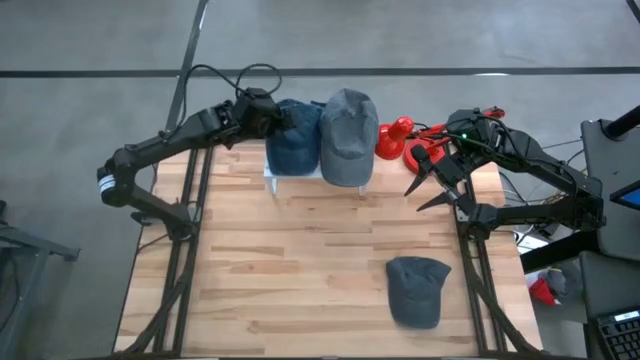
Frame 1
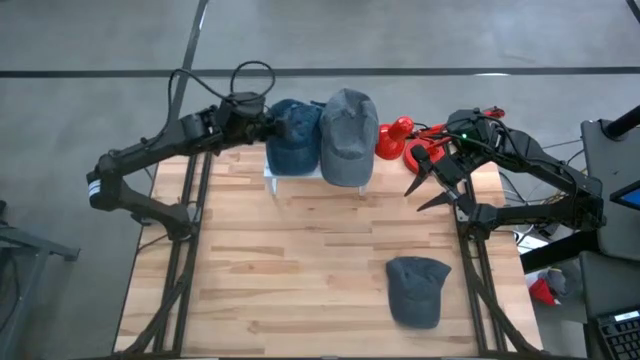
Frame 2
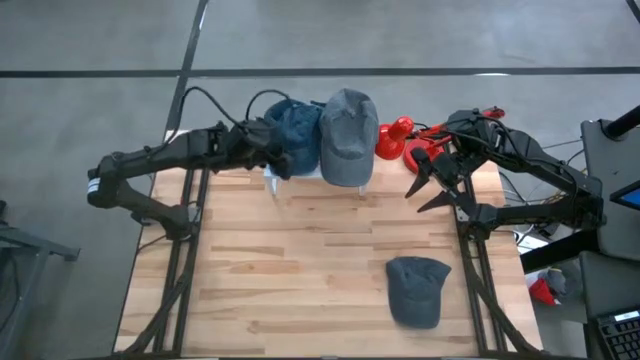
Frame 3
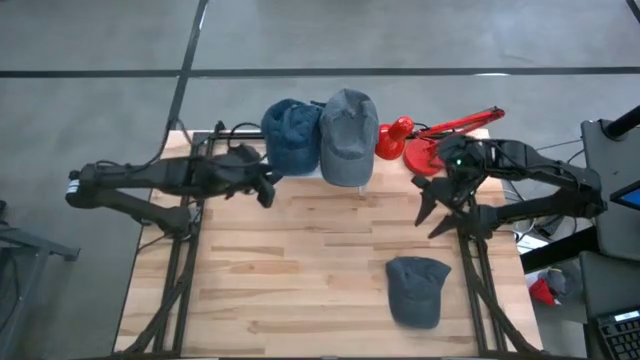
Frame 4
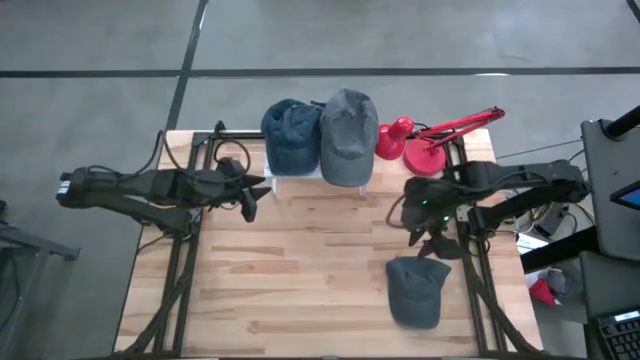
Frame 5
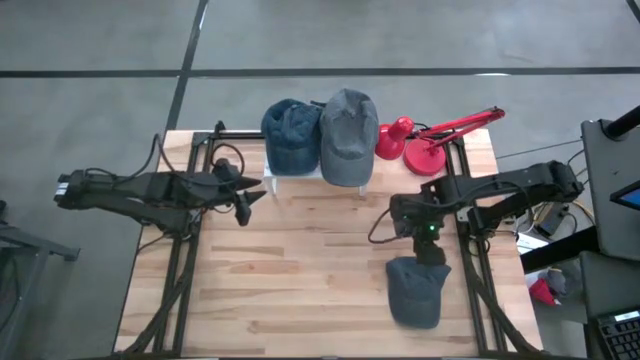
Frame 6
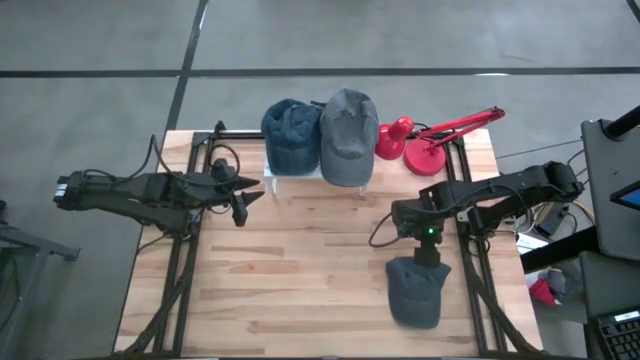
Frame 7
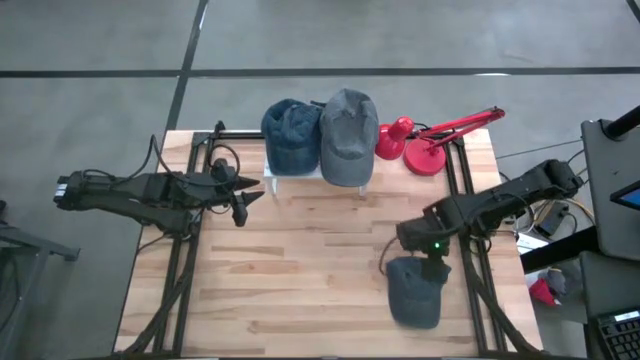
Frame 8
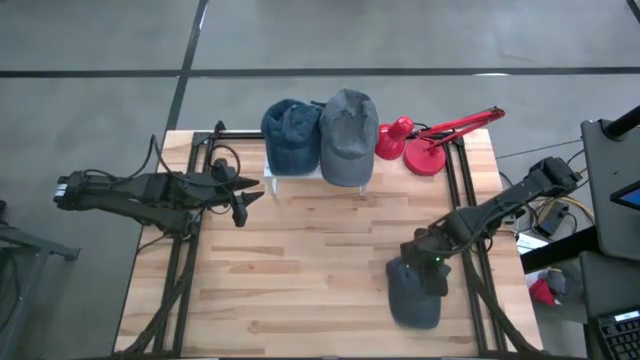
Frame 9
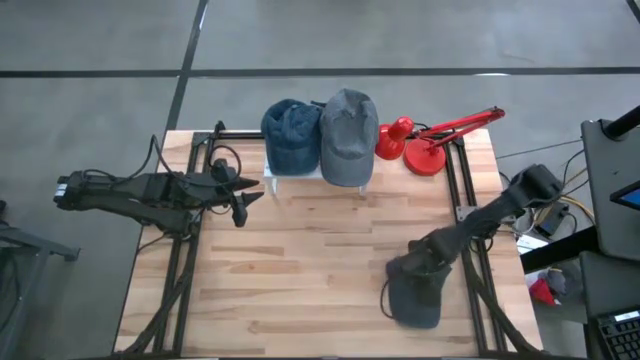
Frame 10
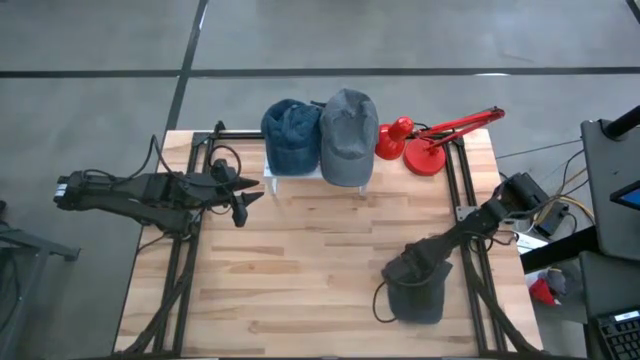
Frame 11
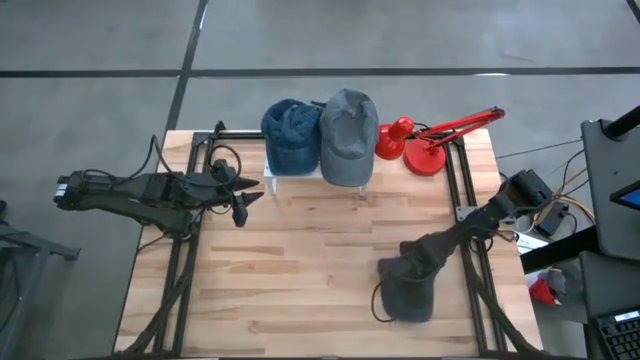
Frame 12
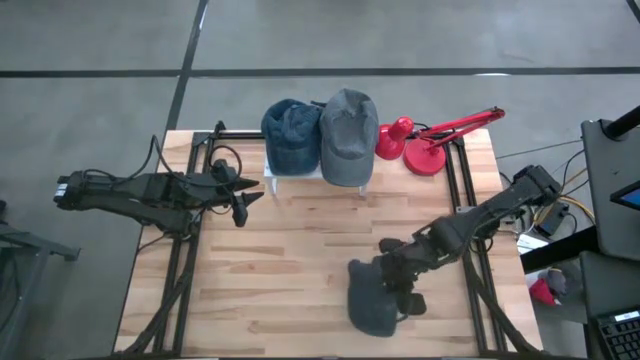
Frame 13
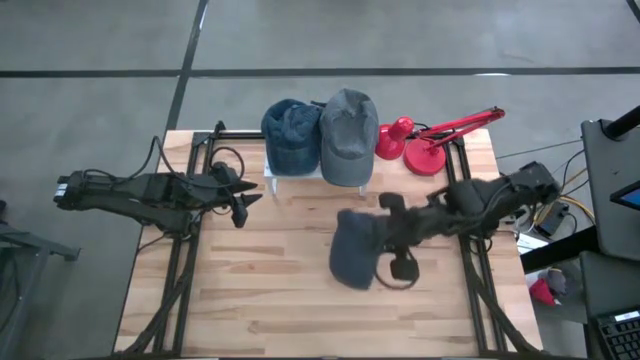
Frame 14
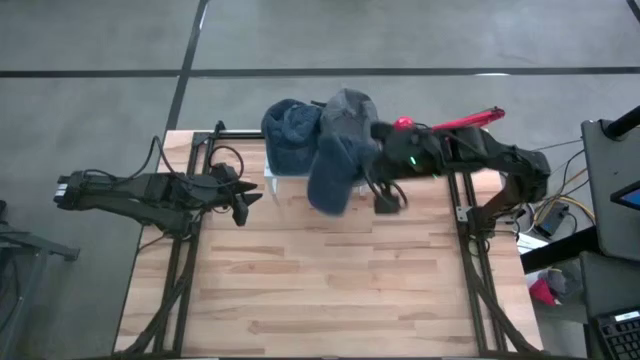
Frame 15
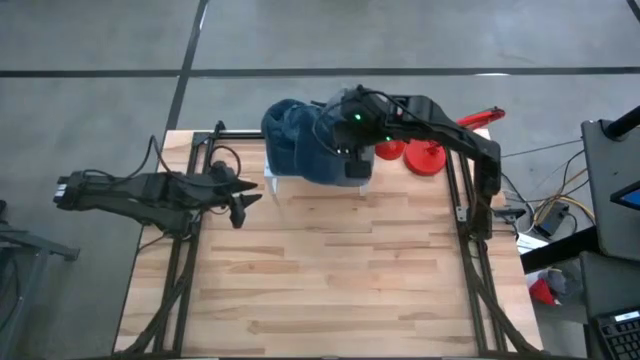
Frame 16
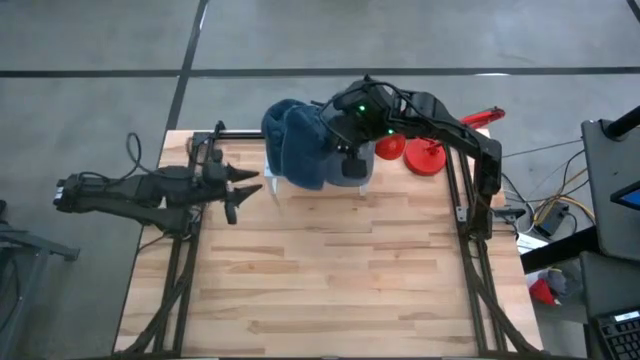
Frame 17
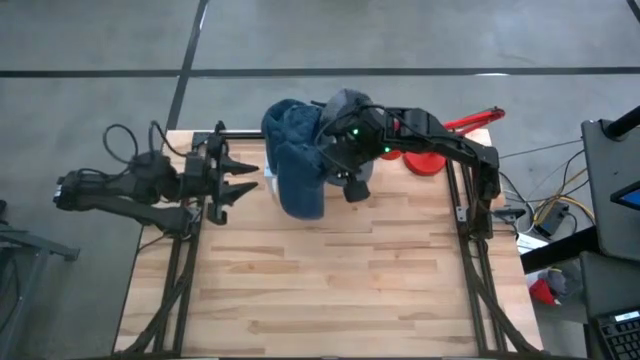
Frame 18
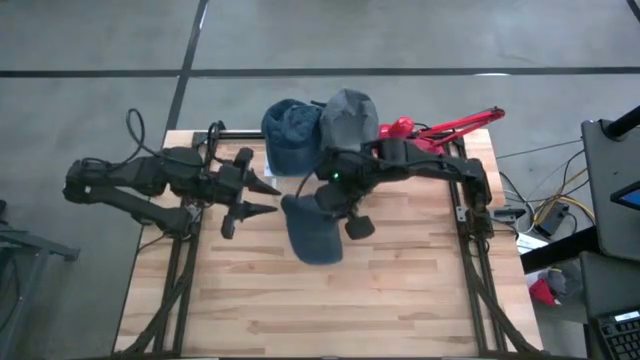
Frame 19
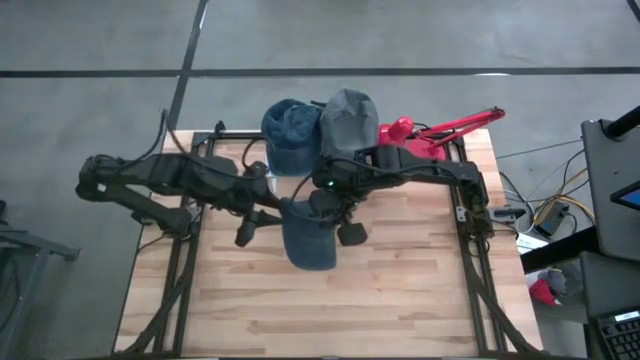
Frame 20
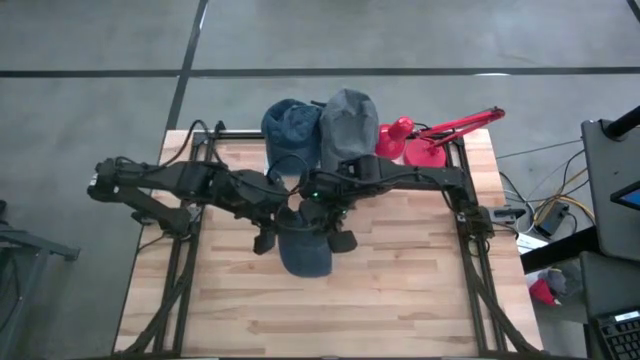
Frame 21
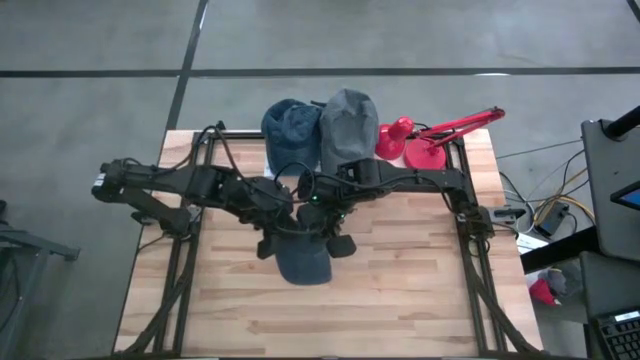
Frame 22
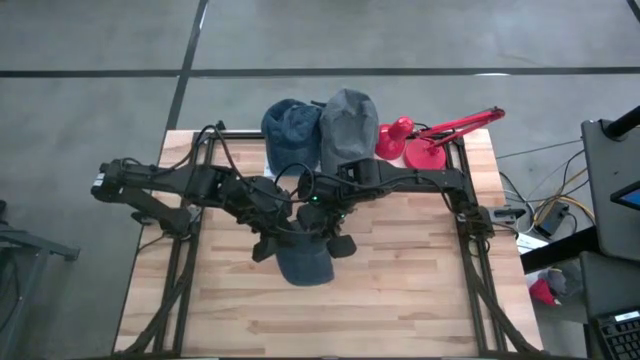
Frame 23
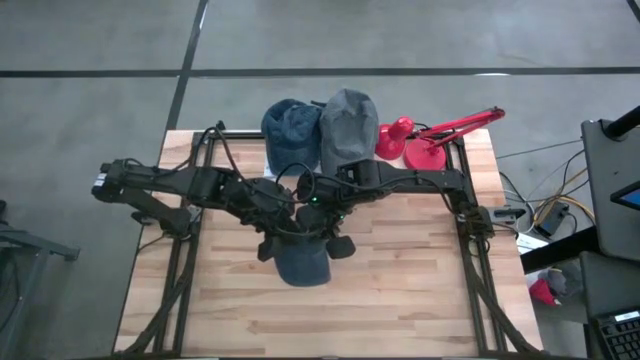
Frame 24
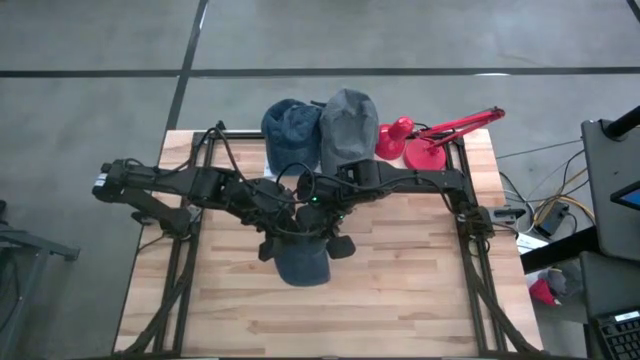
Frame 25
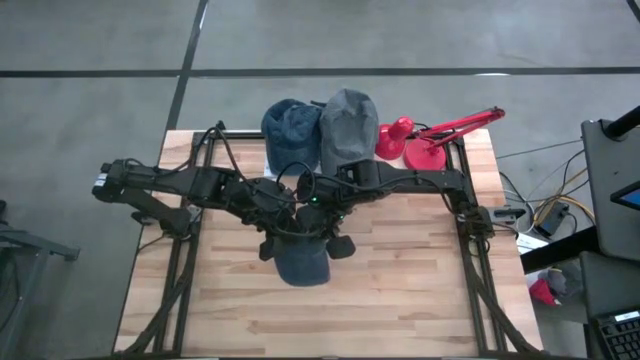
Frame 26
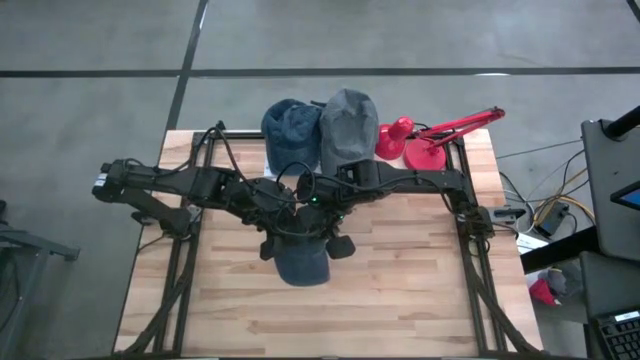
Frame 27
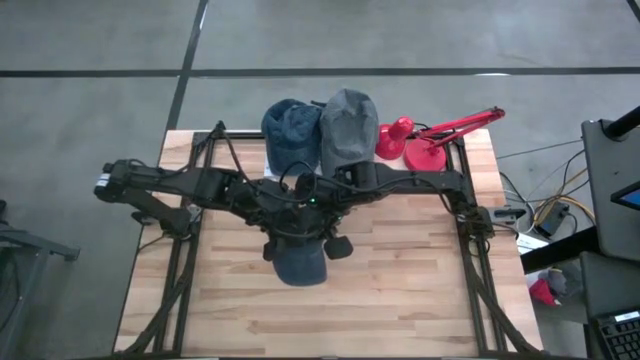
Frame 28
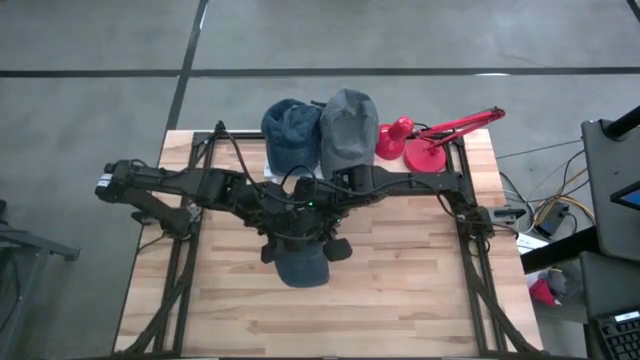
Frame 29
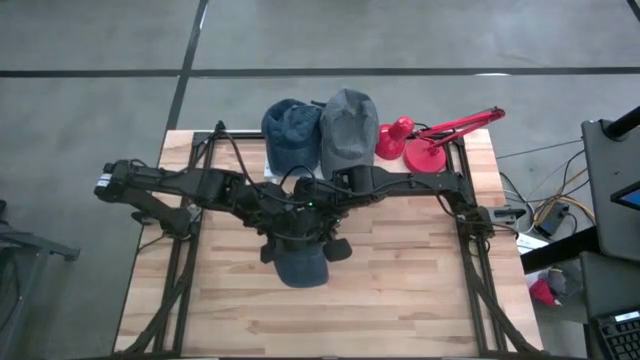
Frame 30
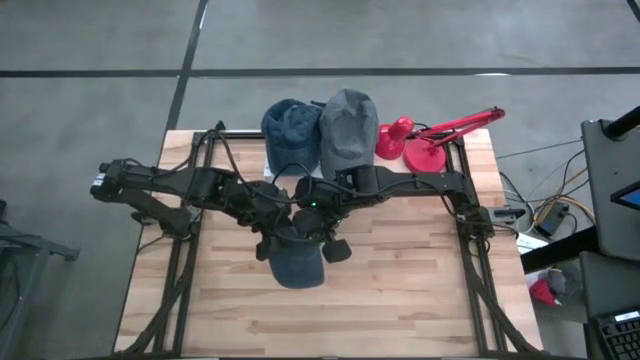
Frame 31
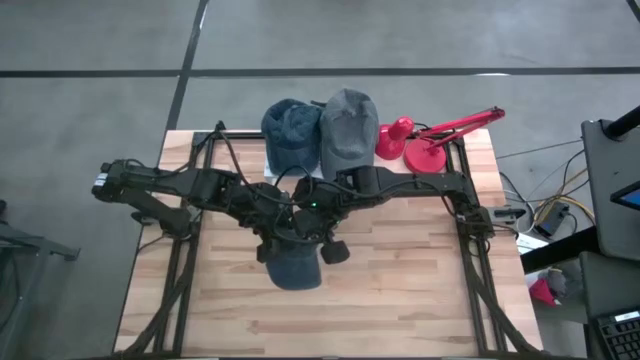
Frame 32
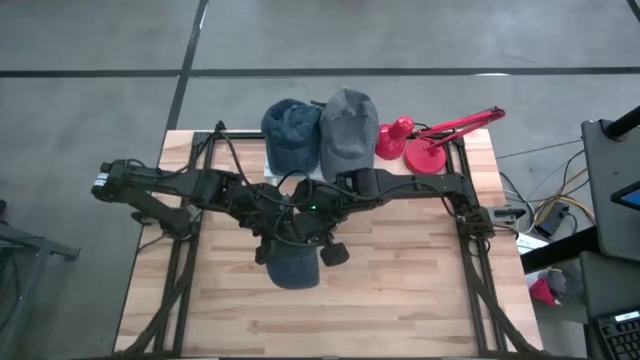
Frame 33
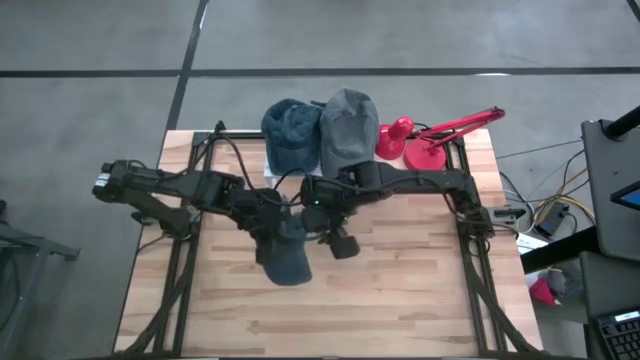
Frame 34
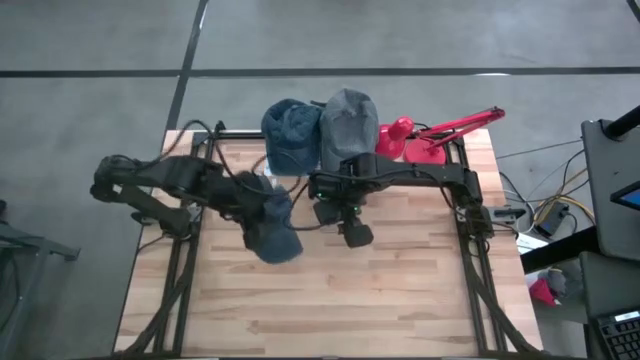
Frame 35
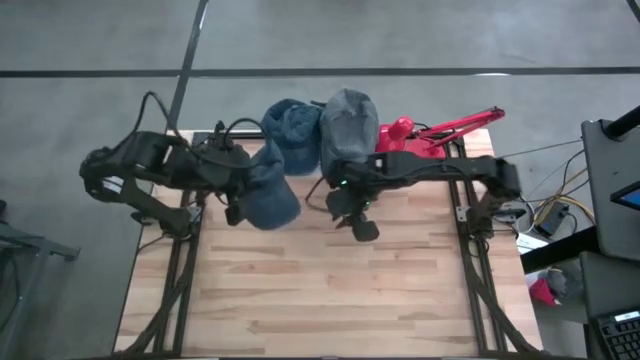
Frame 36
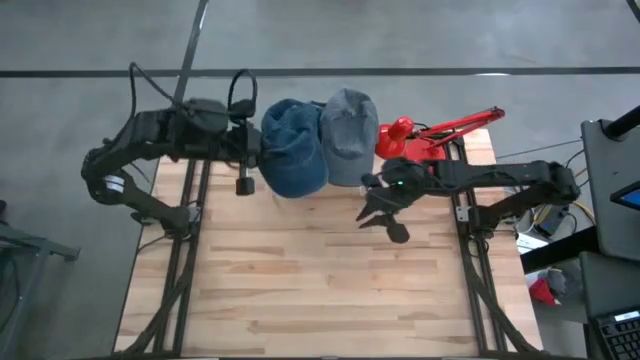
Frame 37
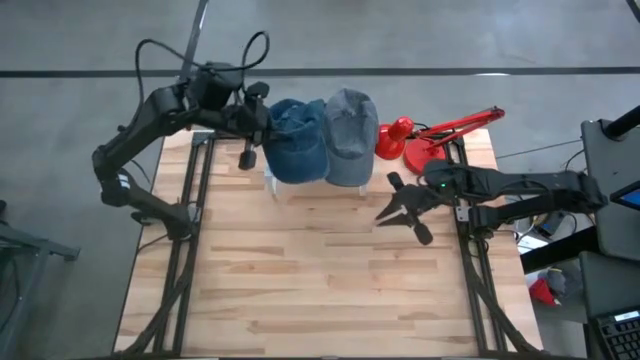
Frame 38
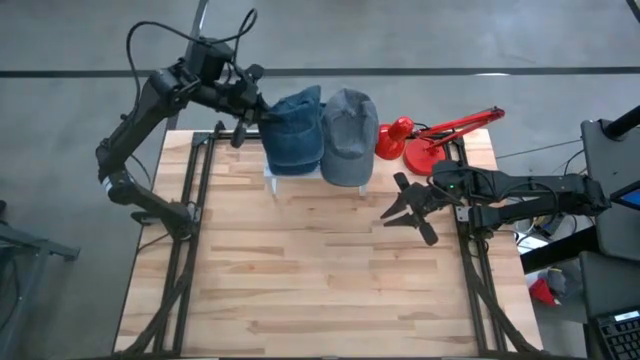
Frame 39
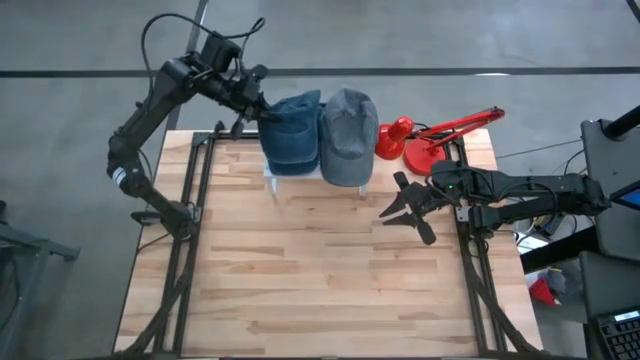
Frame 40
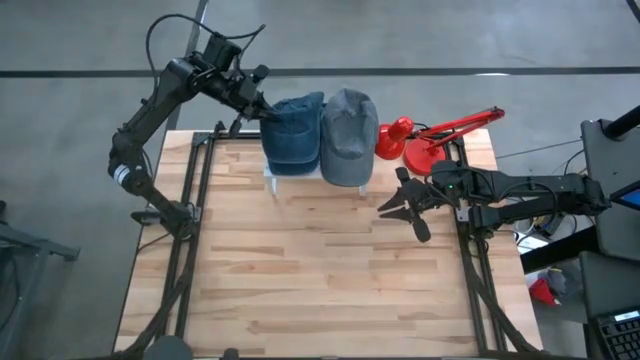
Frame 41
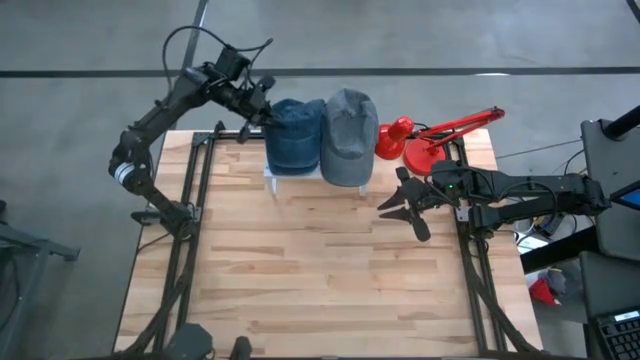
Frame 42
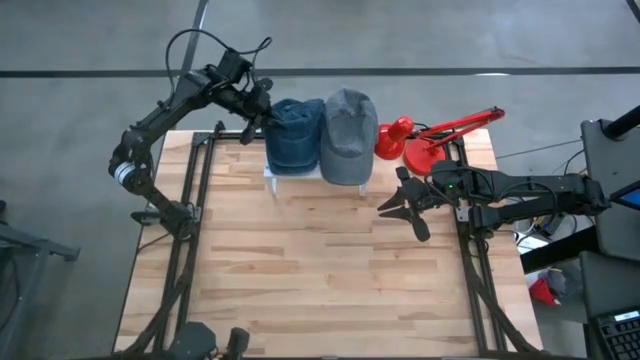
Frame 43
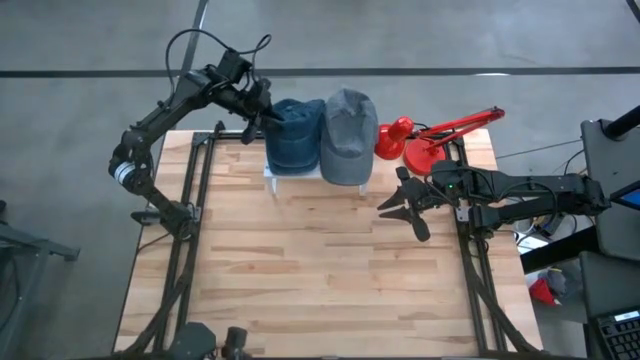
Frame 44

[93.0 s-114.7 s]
Task: Pick & Place hat
Stack the blue cap on the blue cap on the shelf
